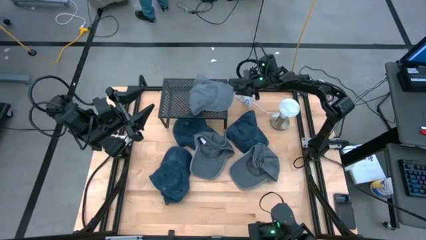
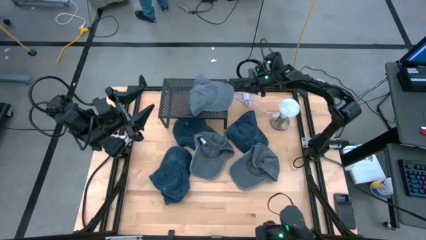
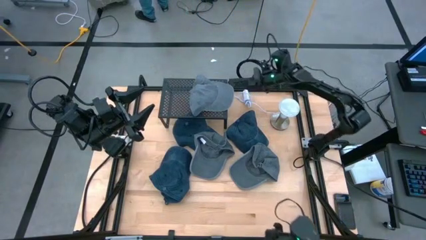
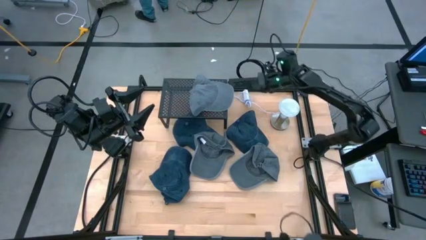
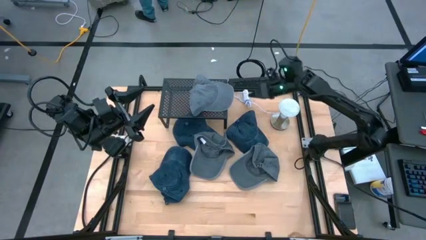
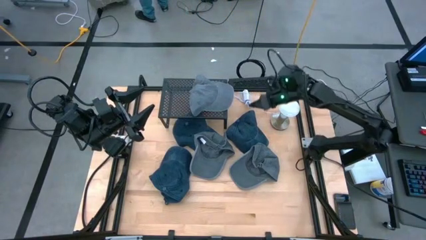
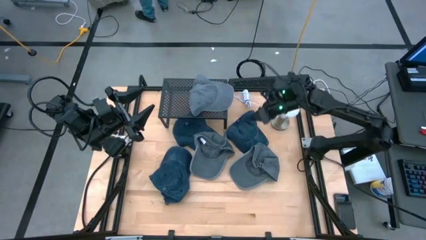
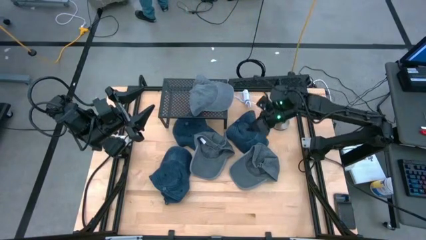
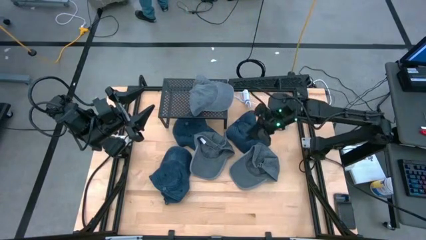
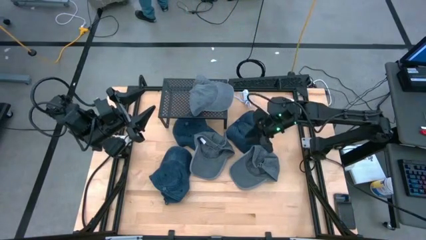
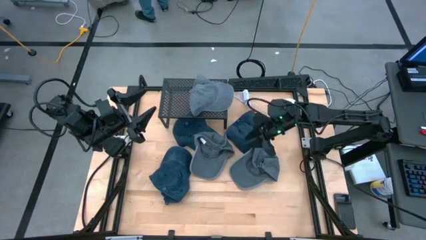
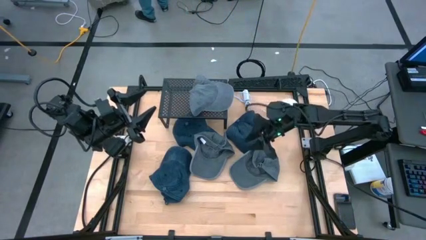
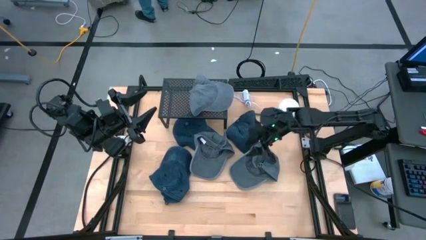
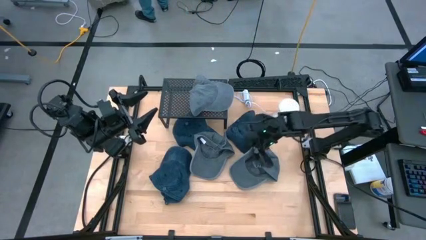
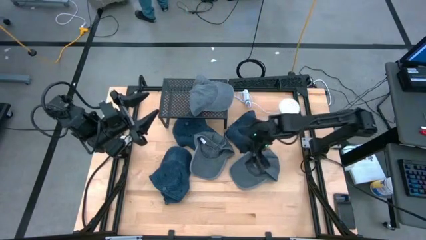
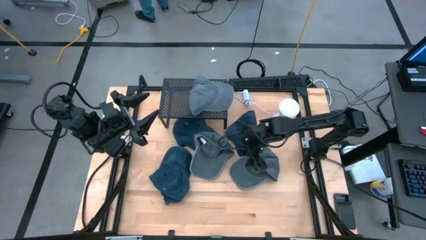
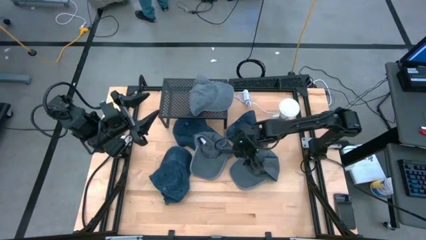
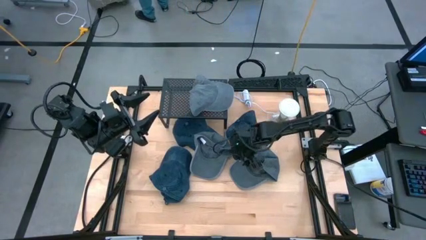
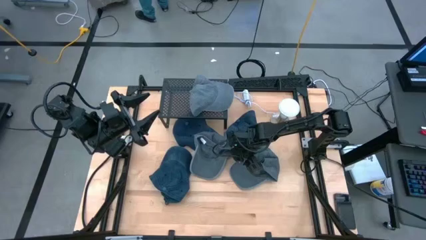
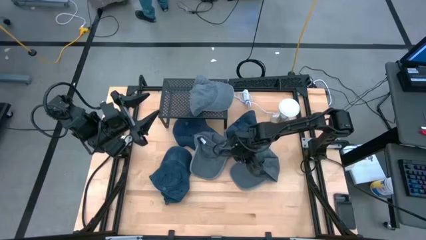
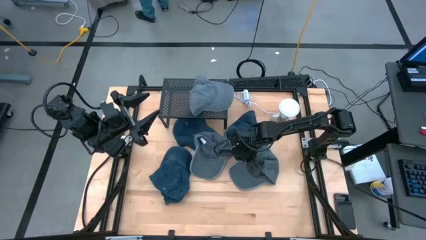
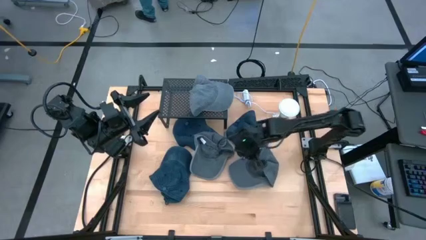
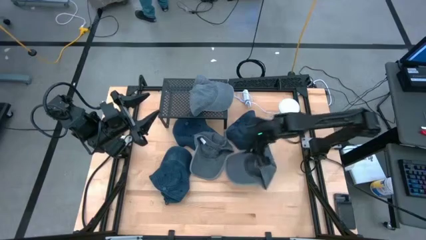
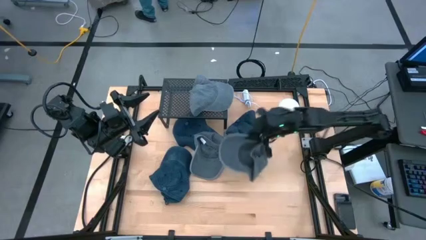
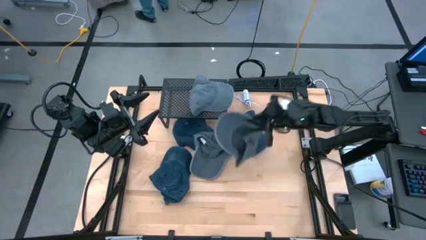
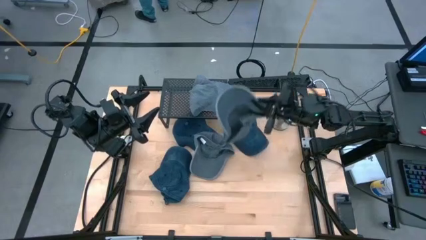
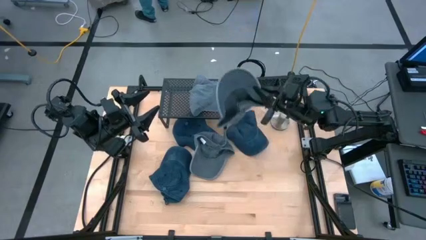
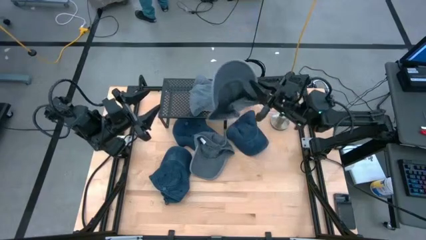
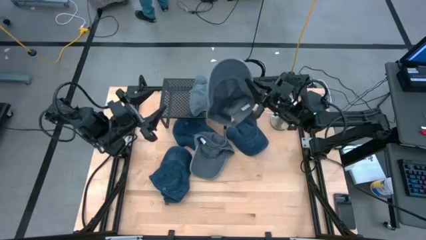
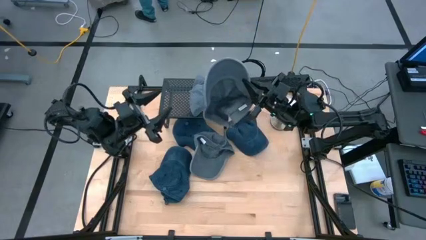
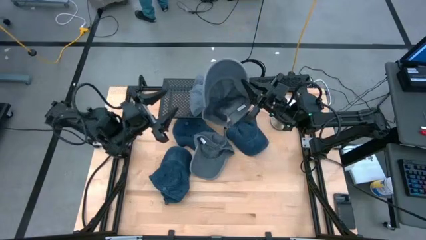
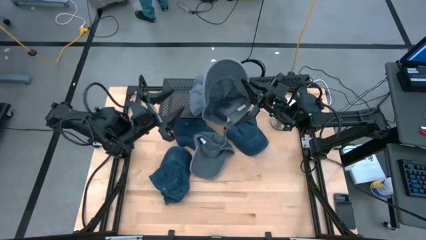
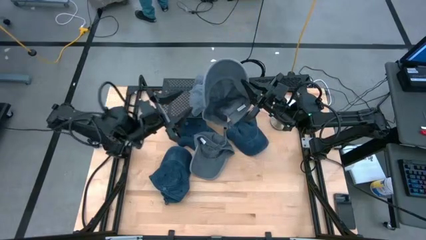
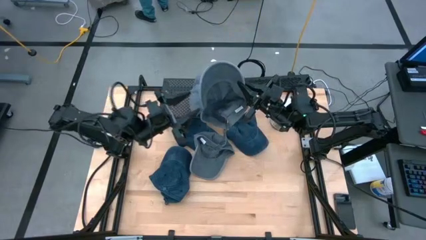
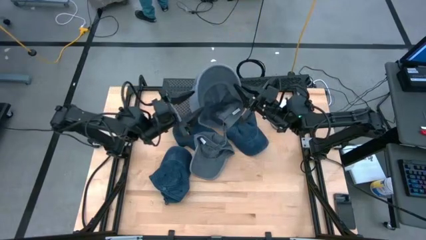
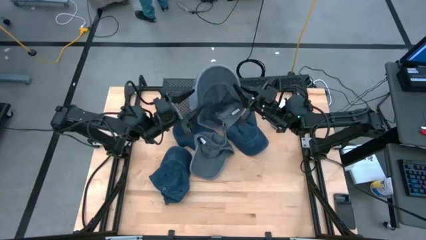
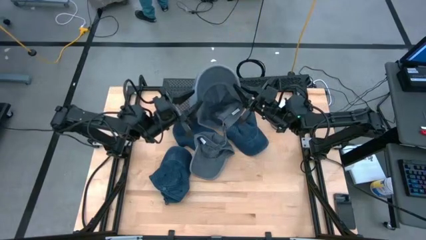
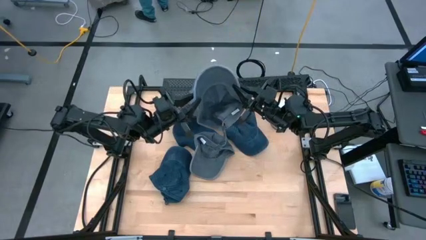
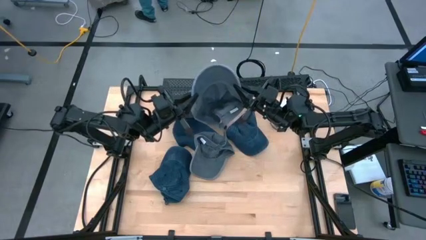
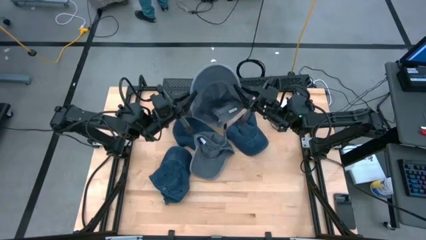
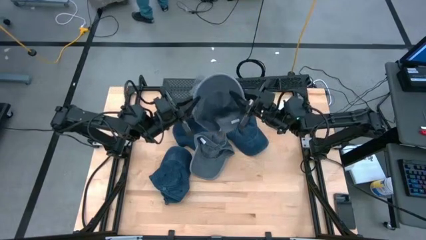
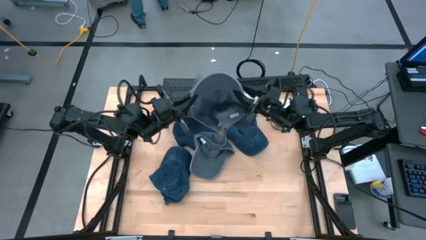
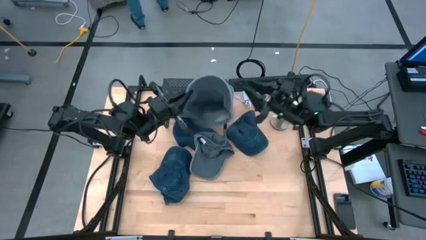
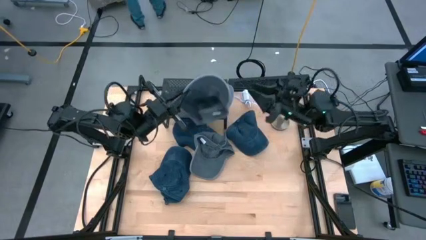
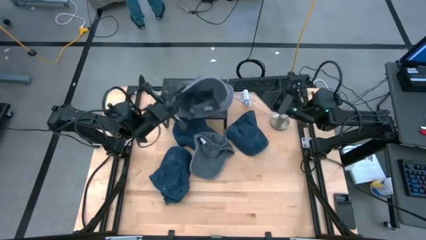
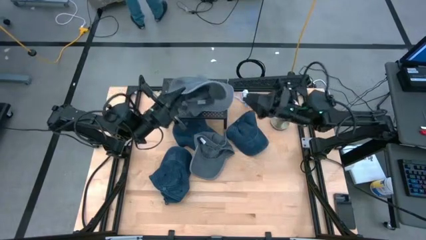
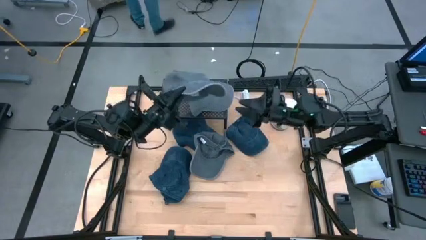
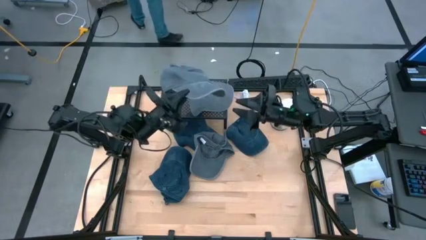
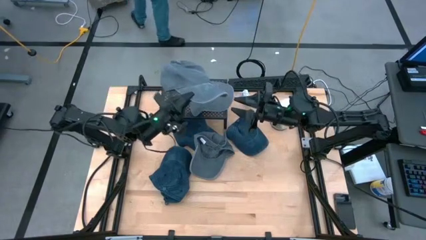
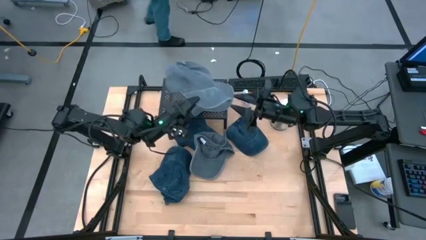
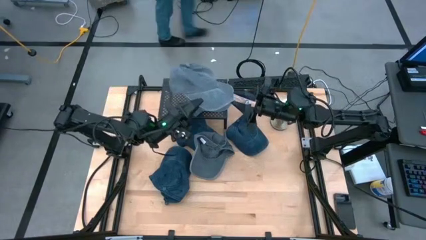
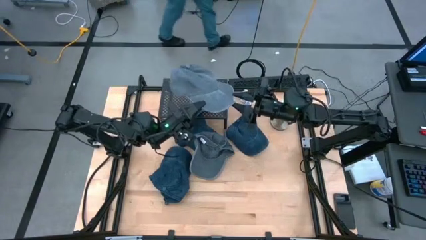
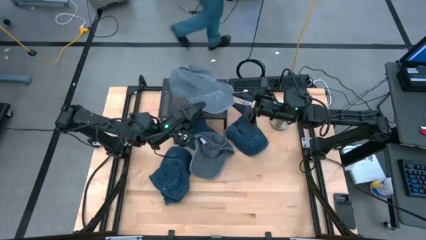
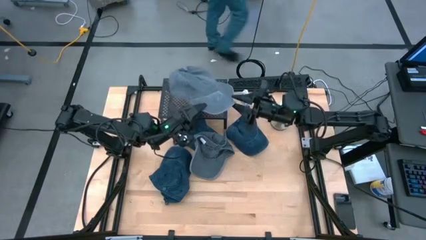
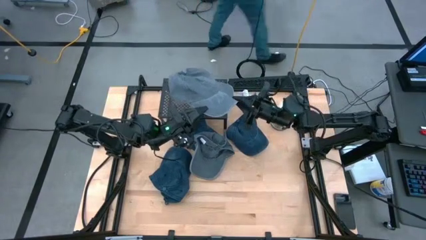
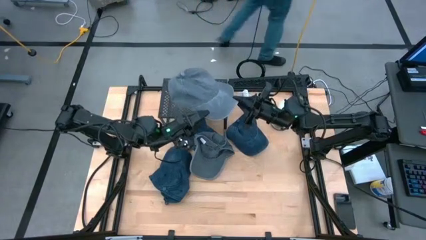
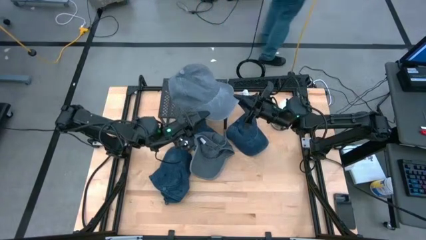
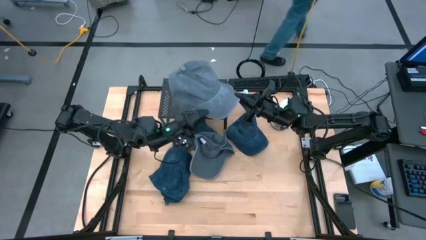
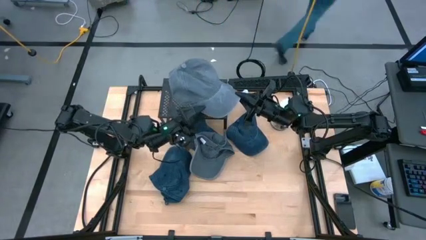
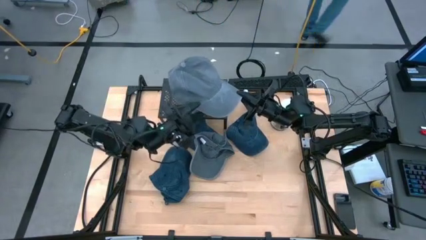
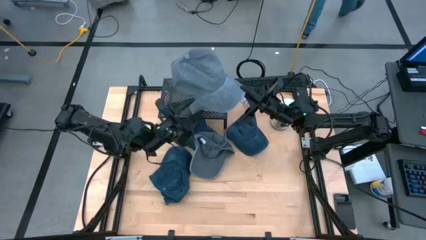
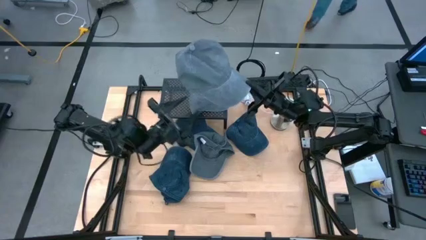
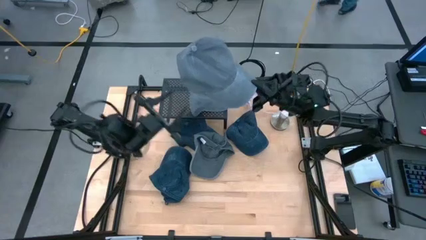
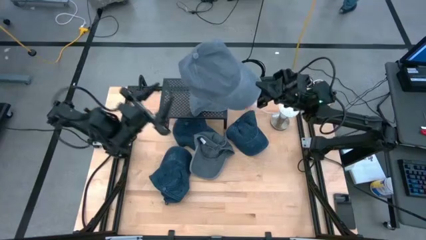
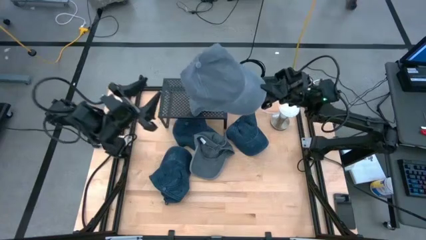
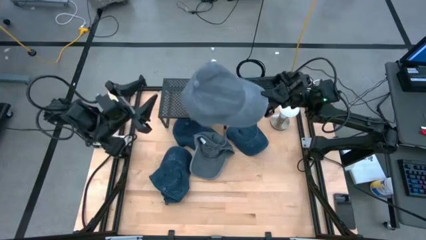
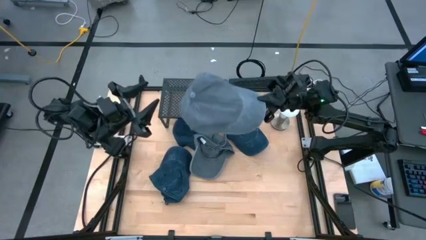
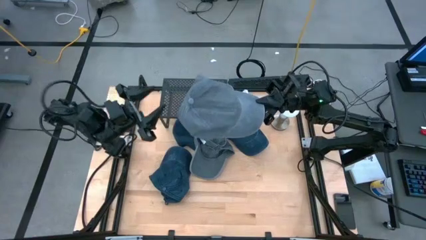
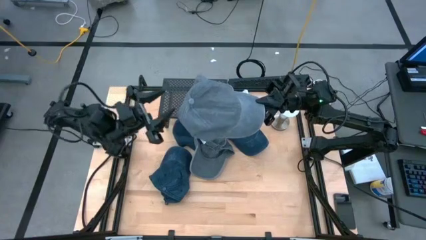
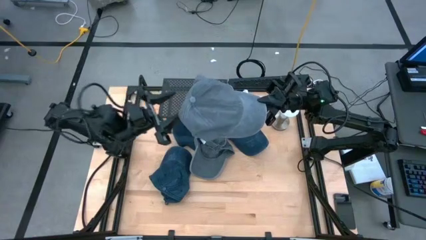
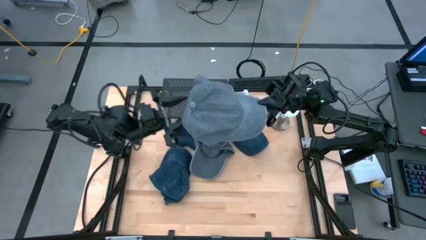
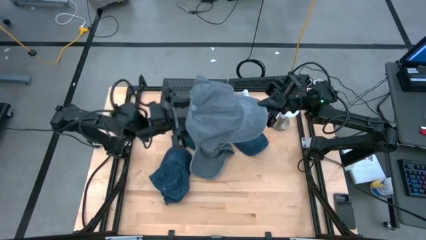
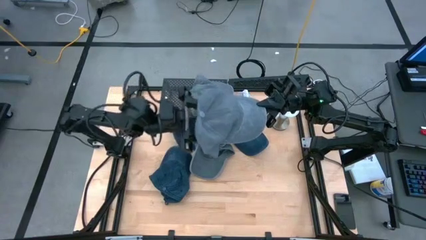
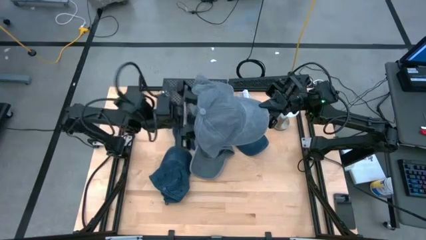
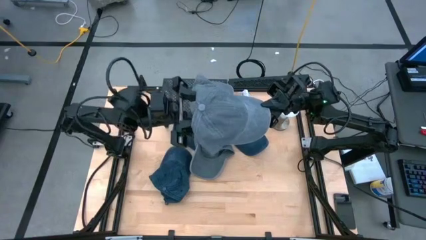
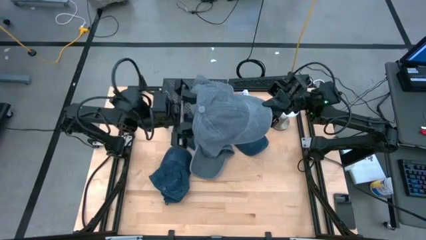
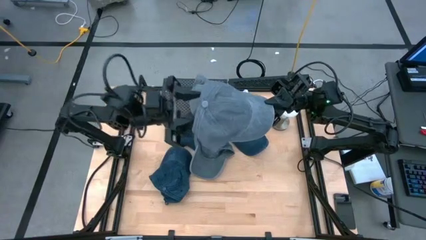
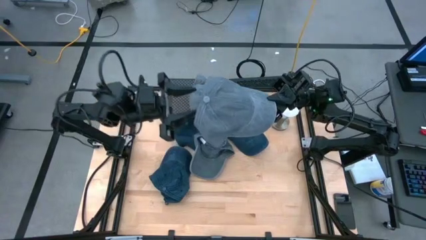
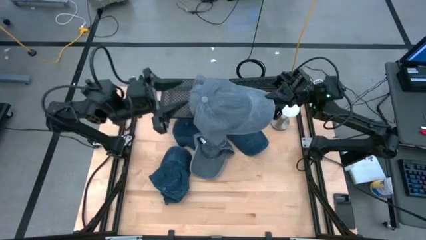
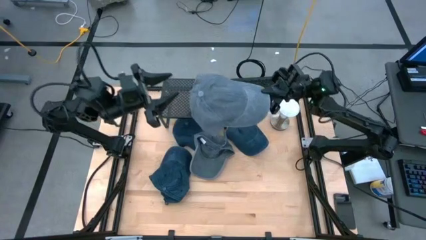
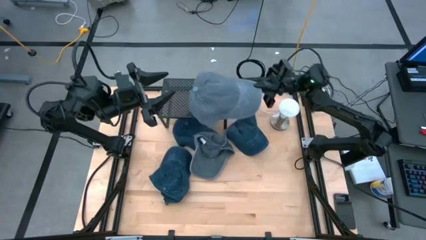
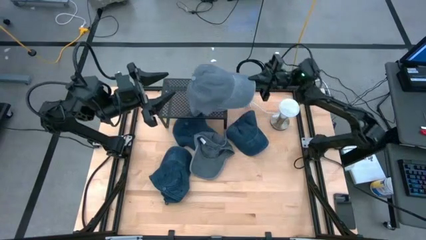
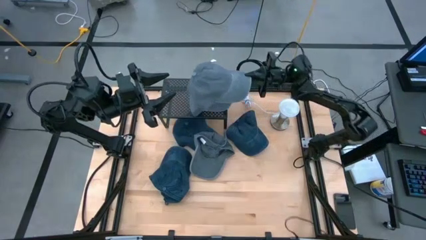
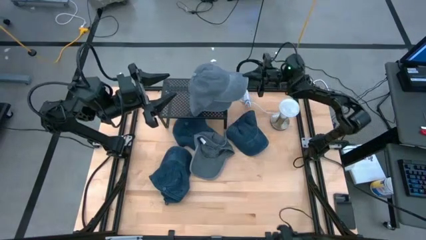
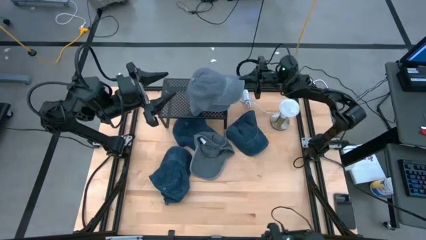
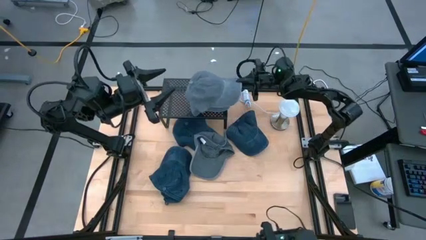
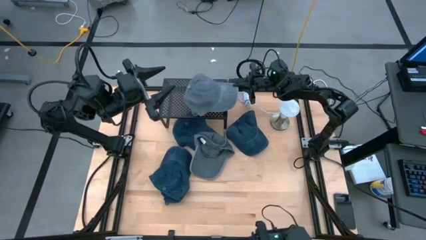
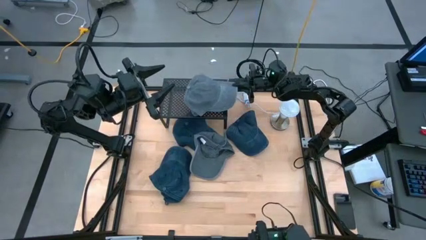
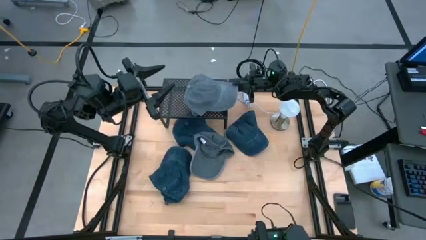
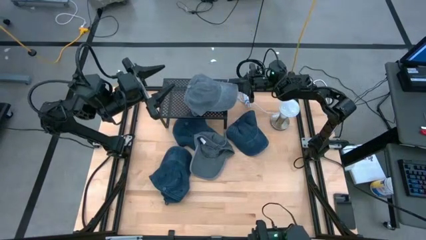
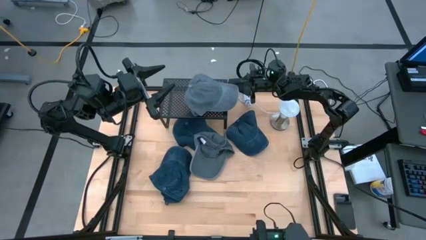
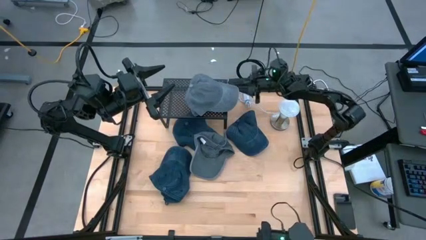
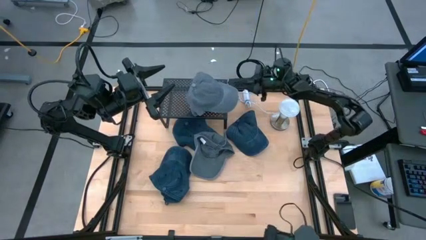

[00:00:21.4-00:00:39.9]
Task: Pick & Place hat
Stack the right dark gray cap on top of the other dark gray cap on the shelf
